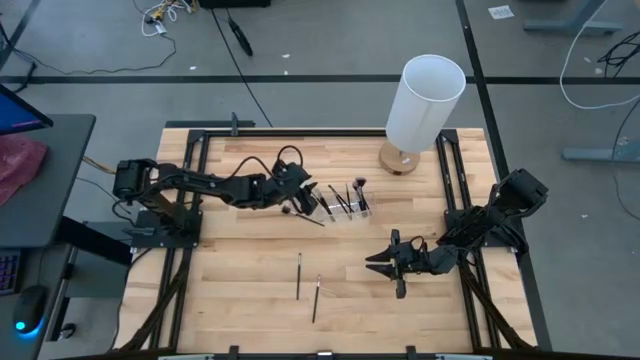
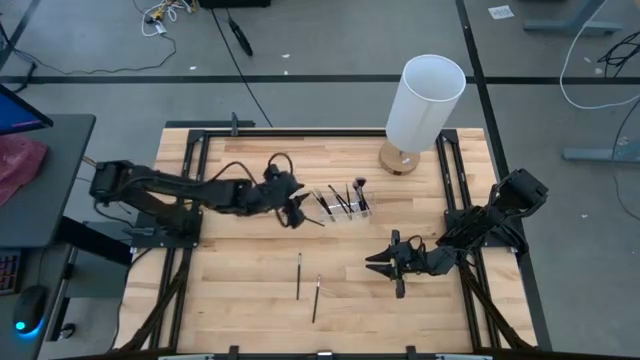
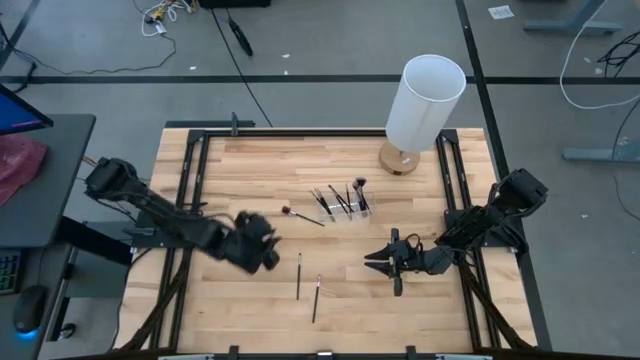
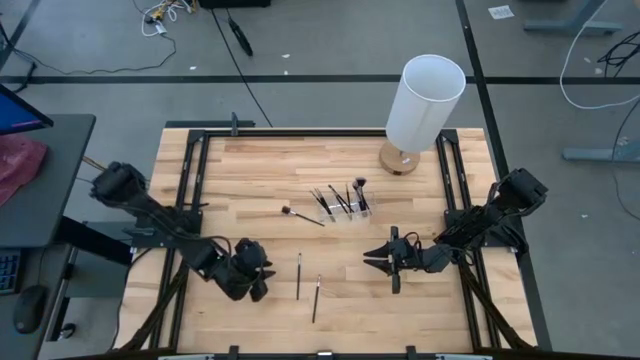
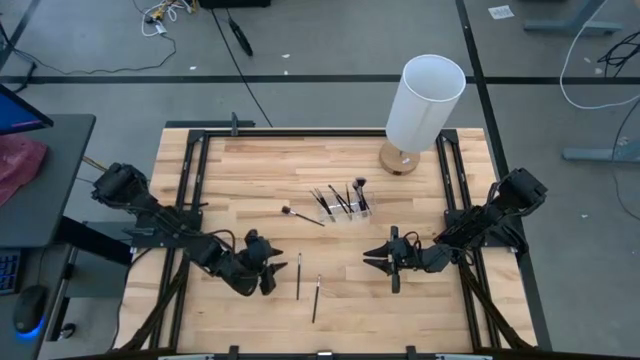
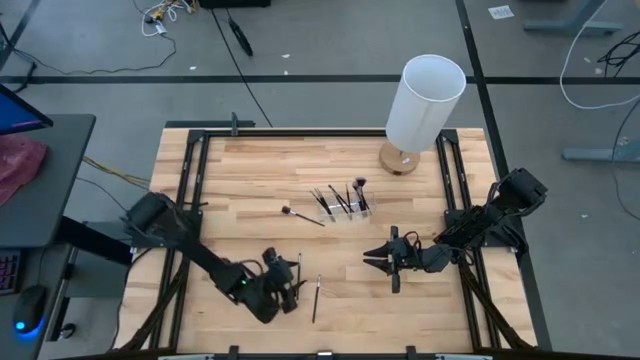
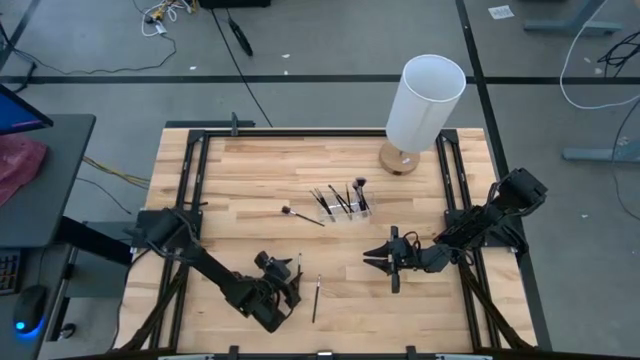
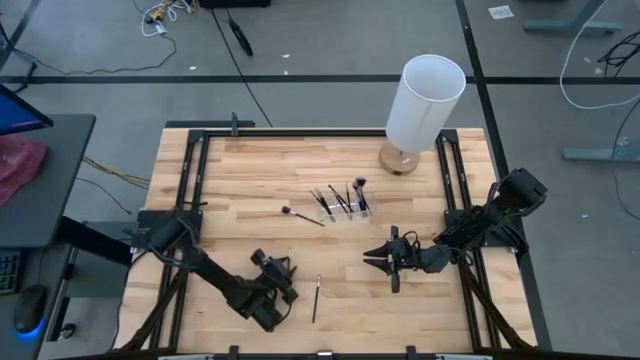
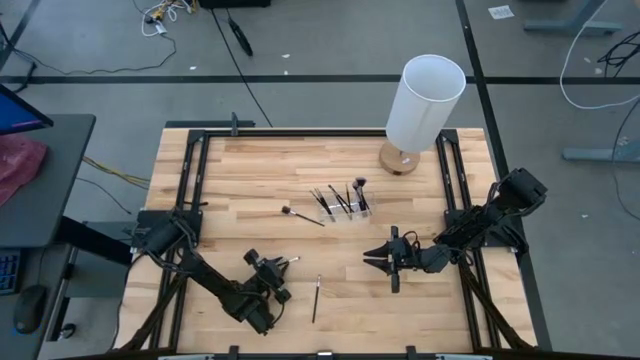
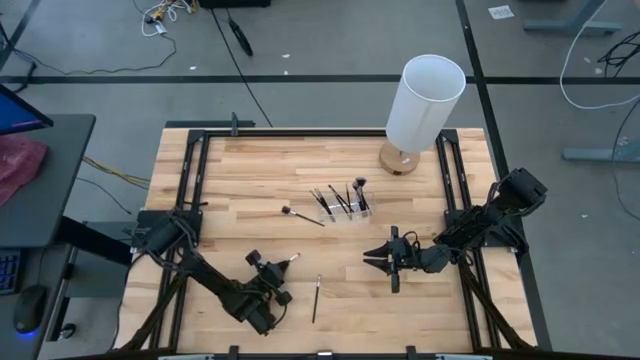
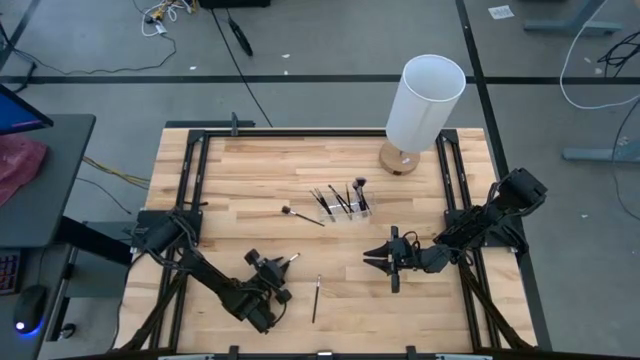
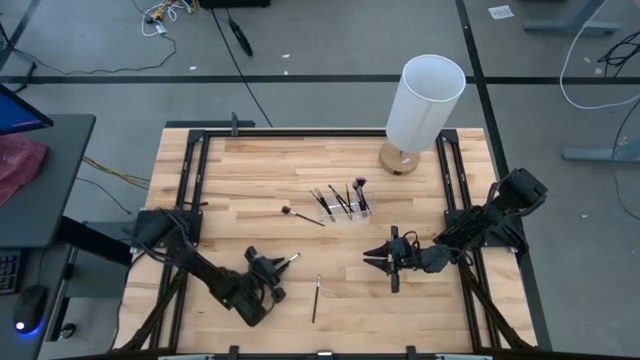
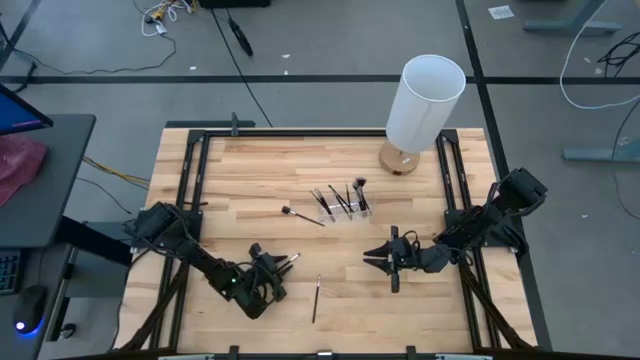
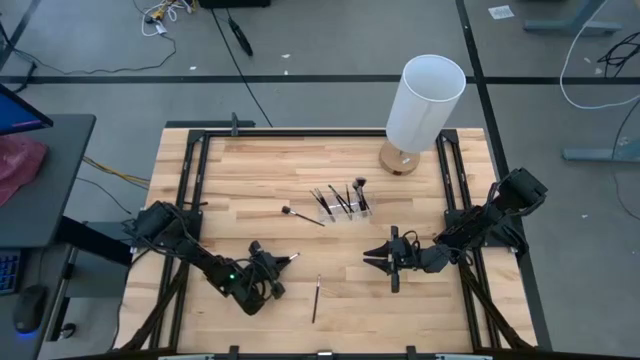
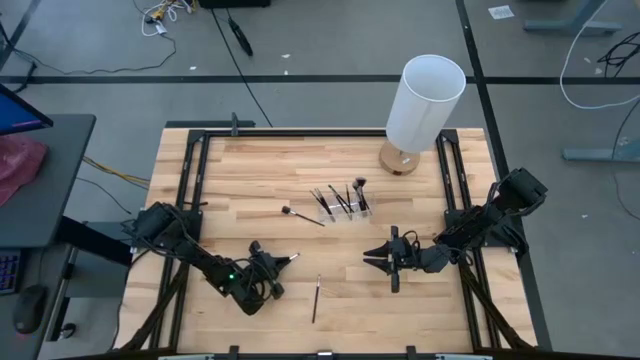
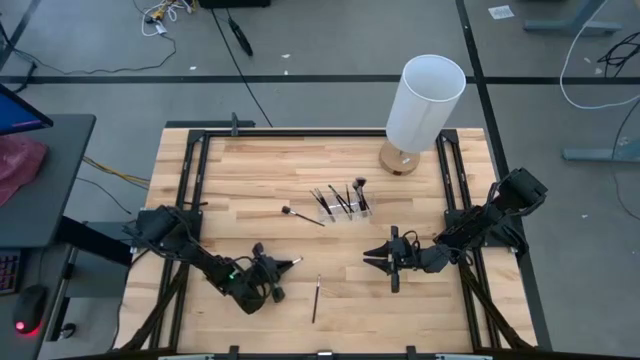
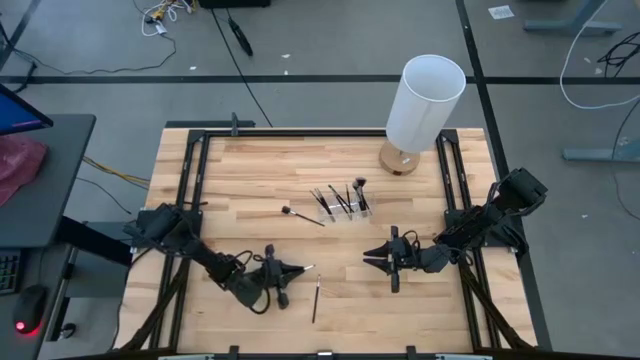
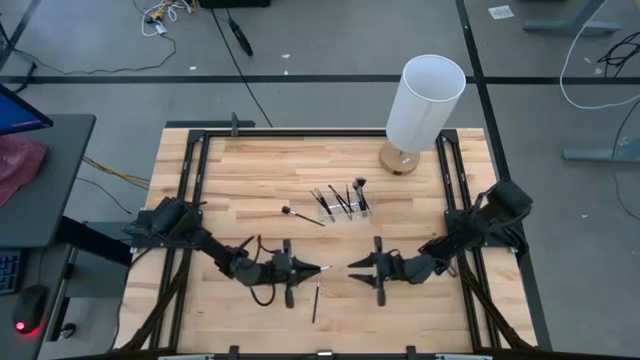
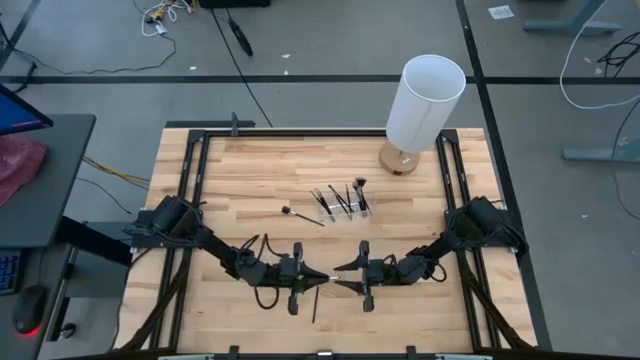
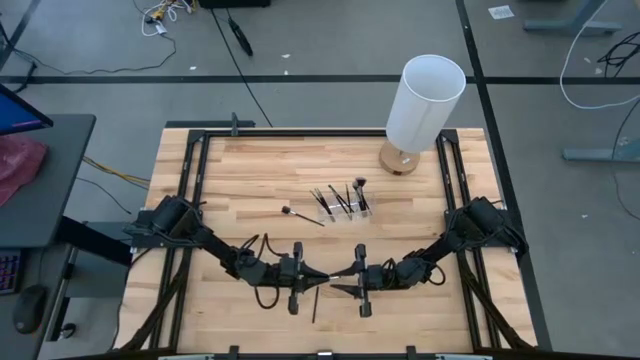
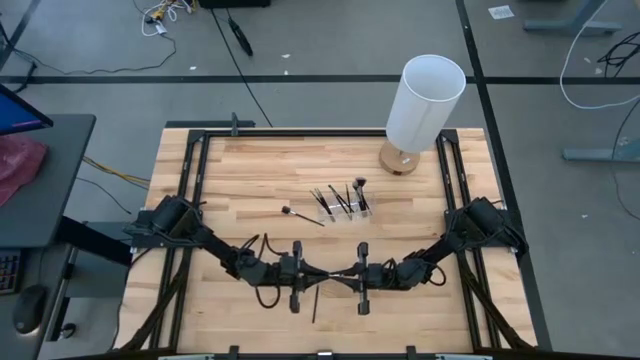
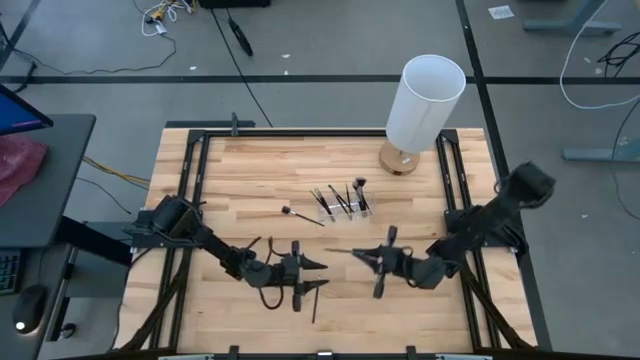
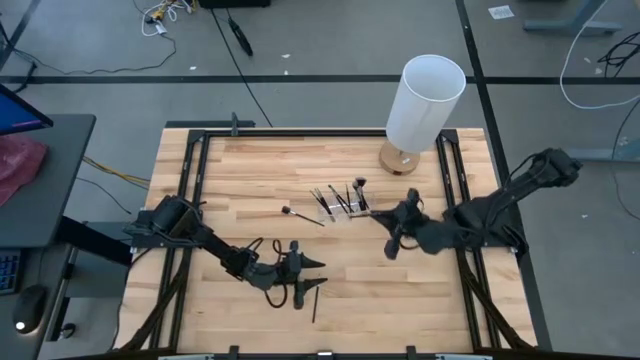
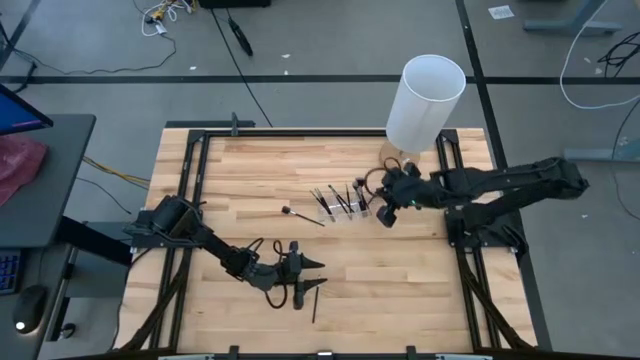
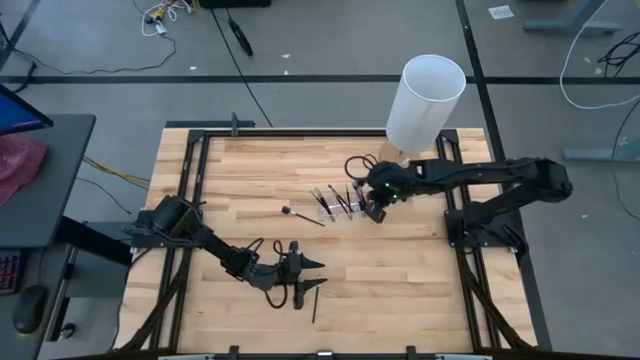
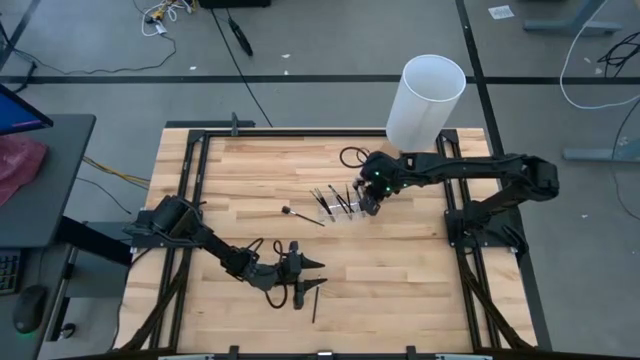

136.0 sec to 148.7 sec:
Task: Pick & Place Makeup Supplies
Put the black makeup brush into the transparent organizer

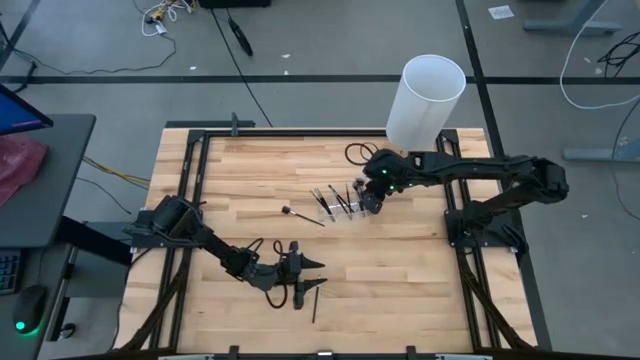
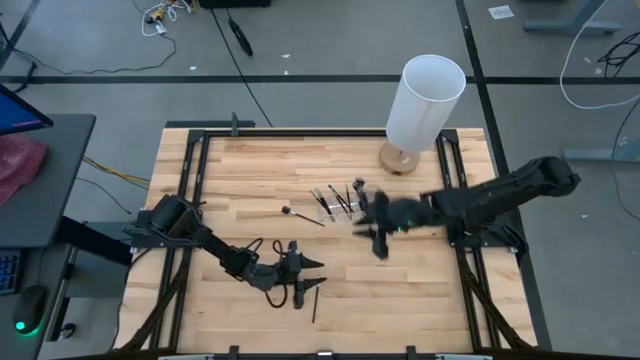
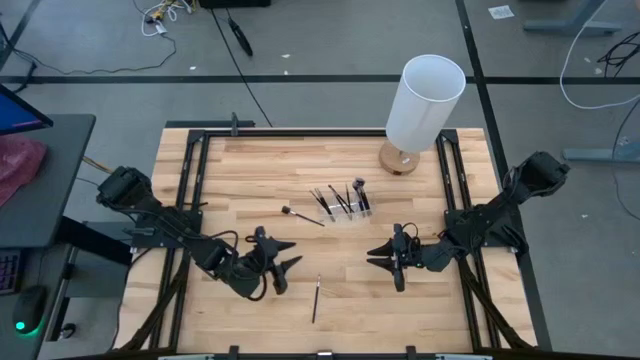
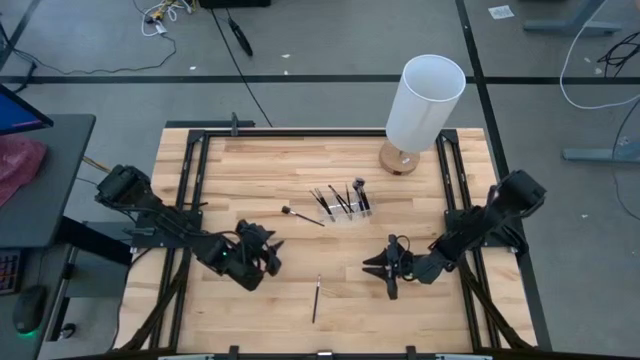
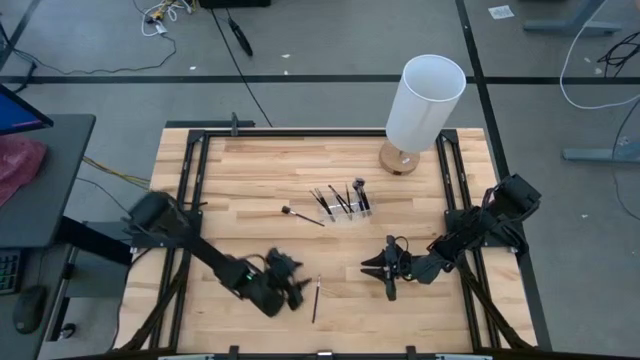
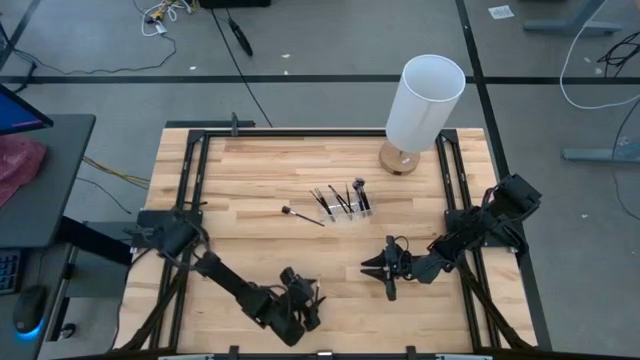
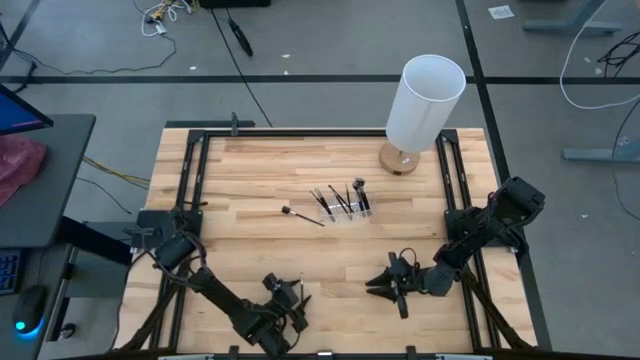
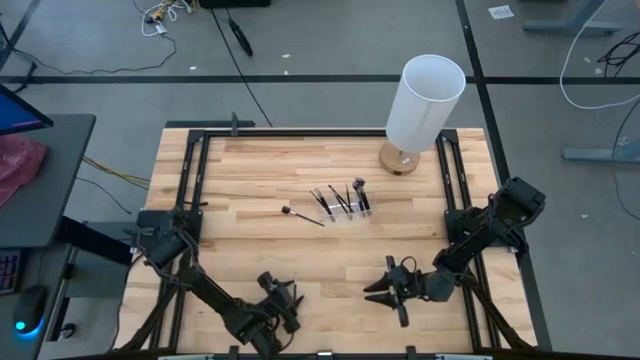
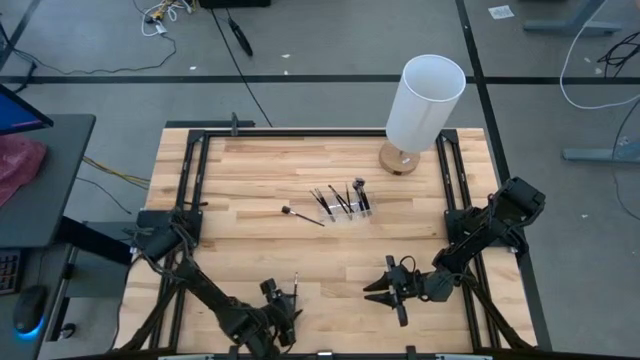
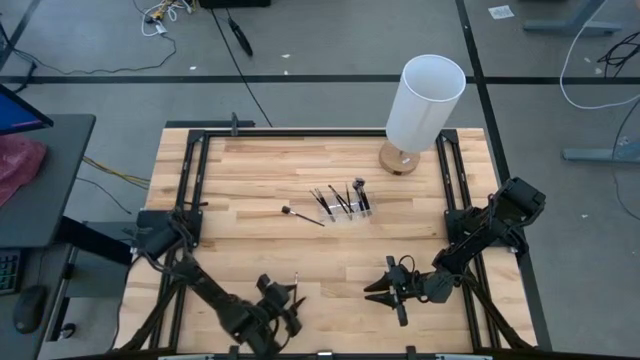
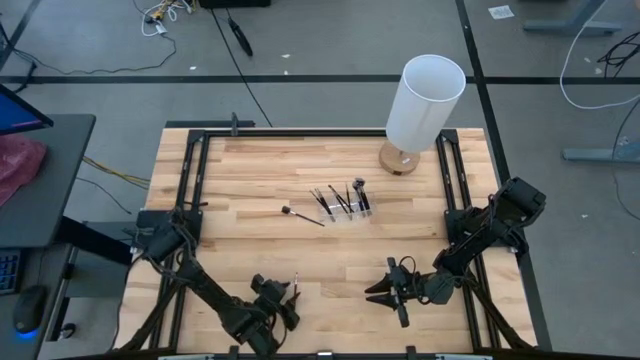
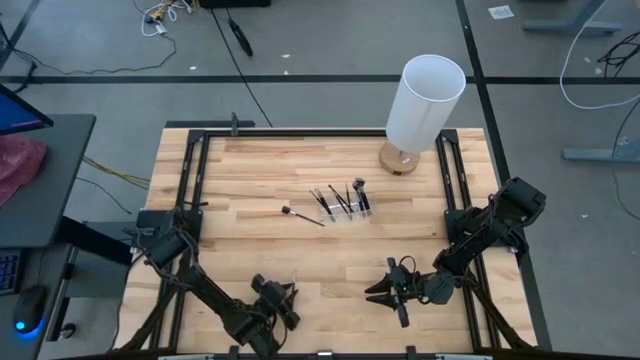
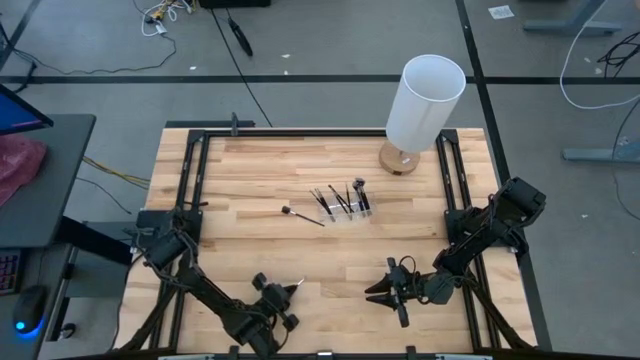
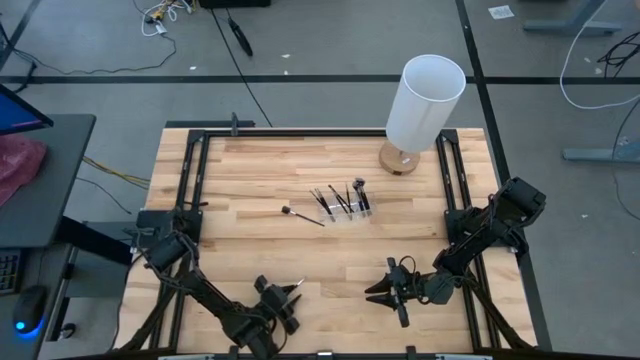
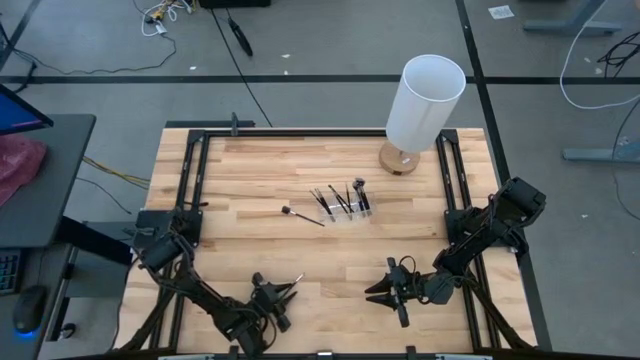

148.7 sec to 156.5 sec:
Put the black makeup brush into the transparent organizer

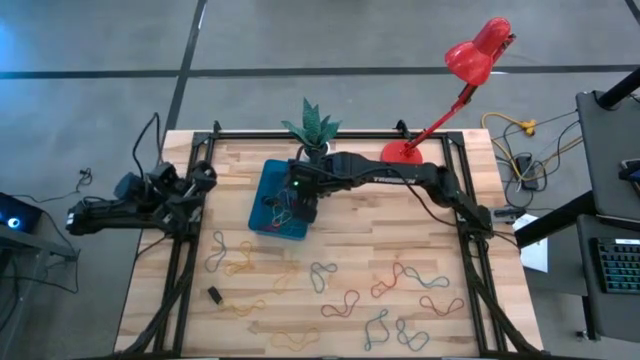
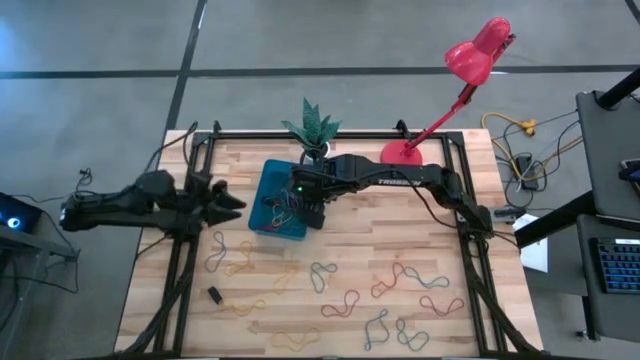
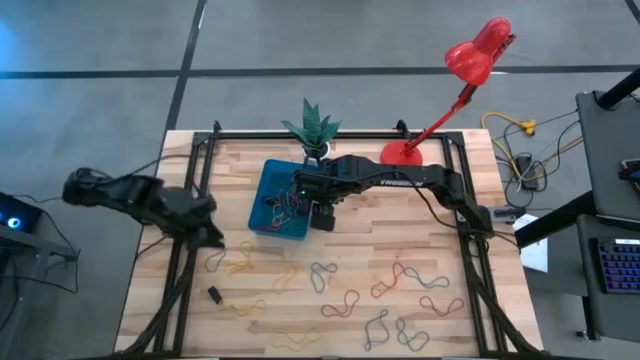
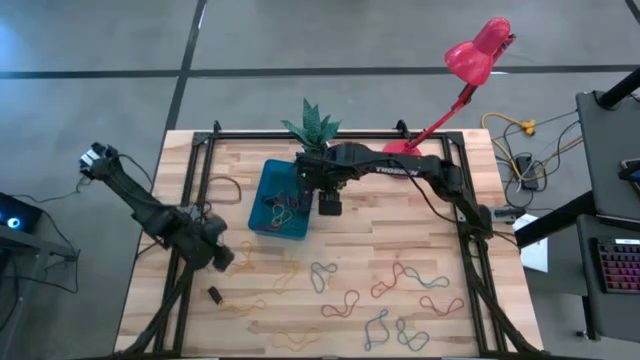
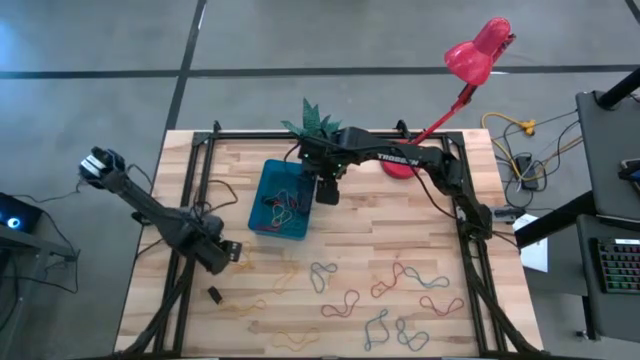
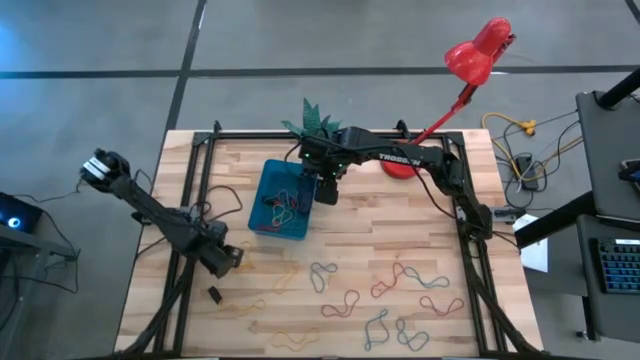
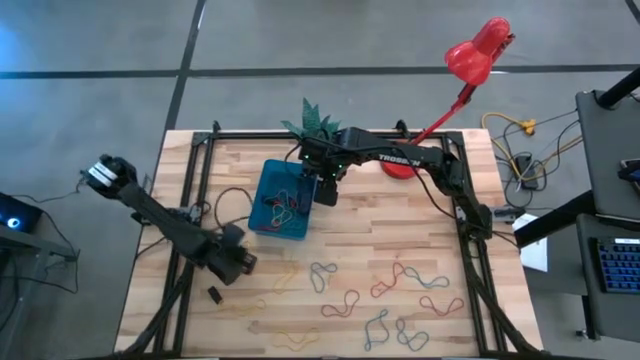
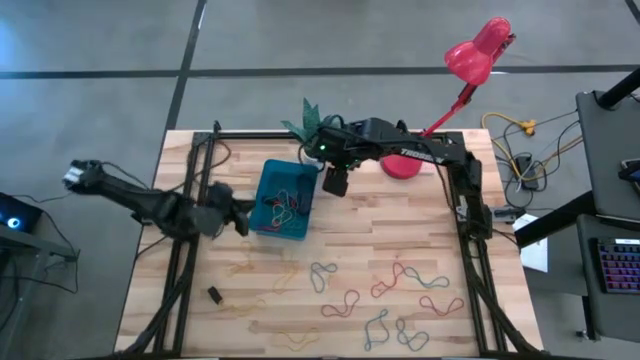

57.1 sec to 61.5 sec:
Task: Pick and place rubber bands into bin
Put the blue rubber band into the blue bin
